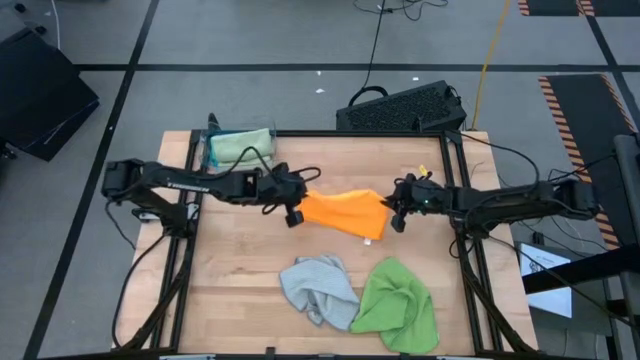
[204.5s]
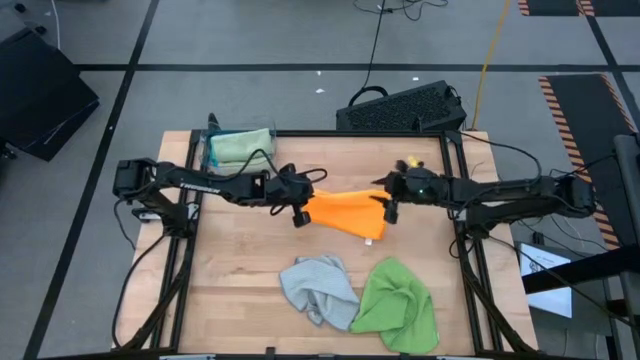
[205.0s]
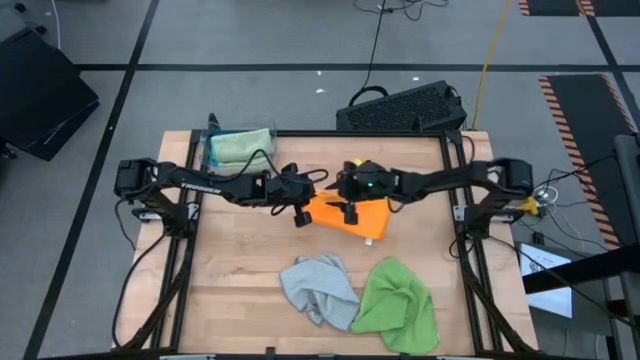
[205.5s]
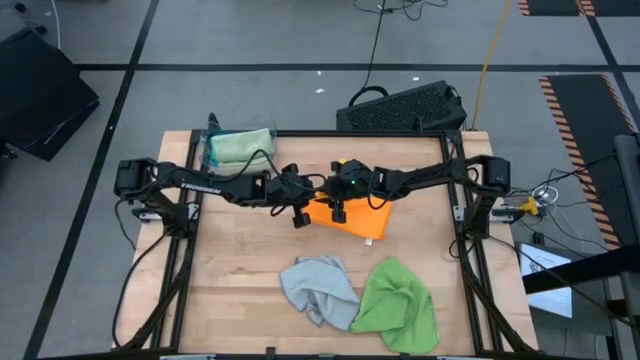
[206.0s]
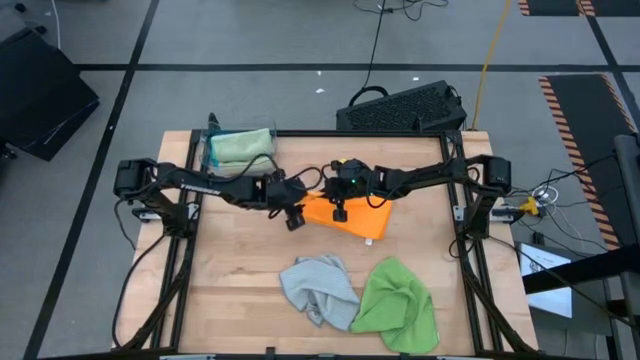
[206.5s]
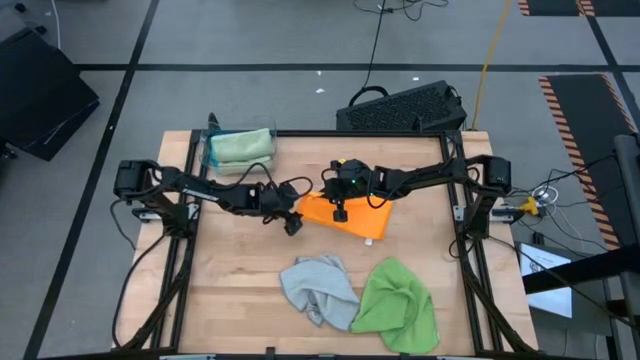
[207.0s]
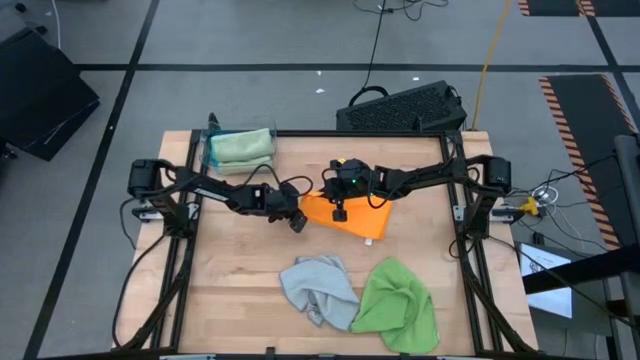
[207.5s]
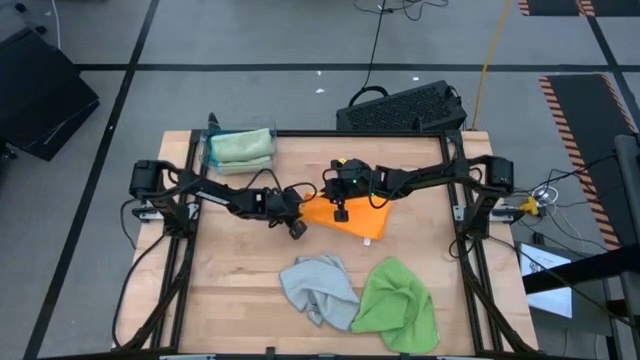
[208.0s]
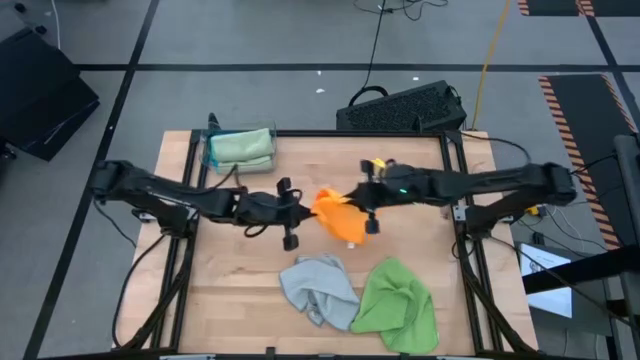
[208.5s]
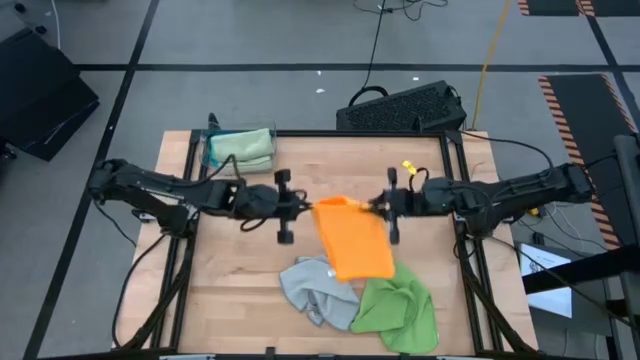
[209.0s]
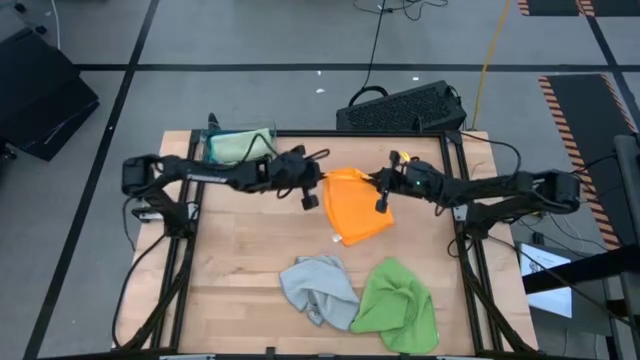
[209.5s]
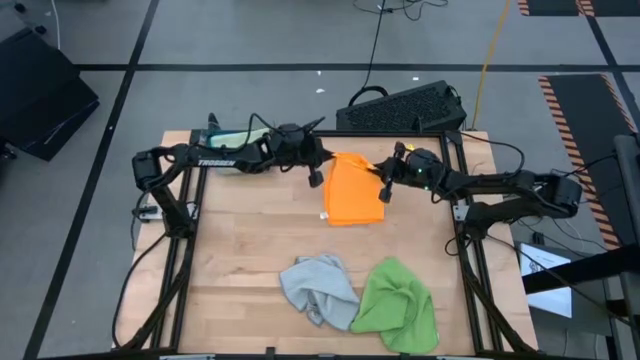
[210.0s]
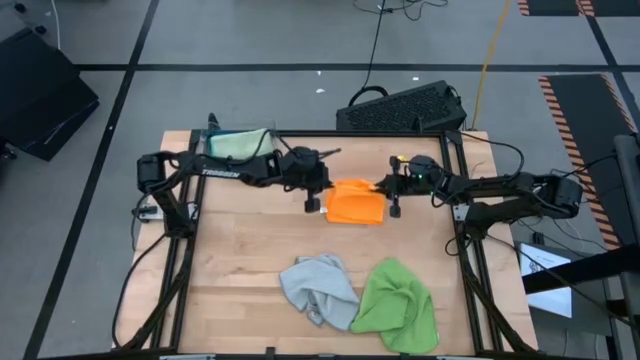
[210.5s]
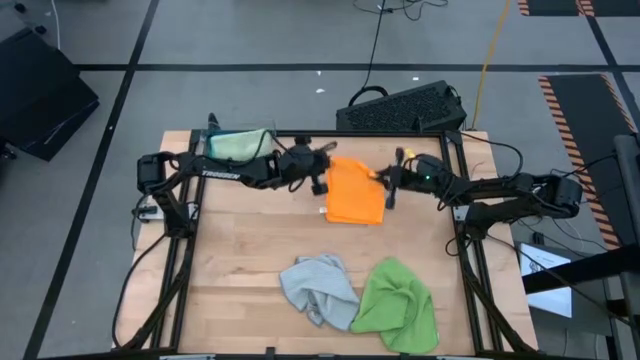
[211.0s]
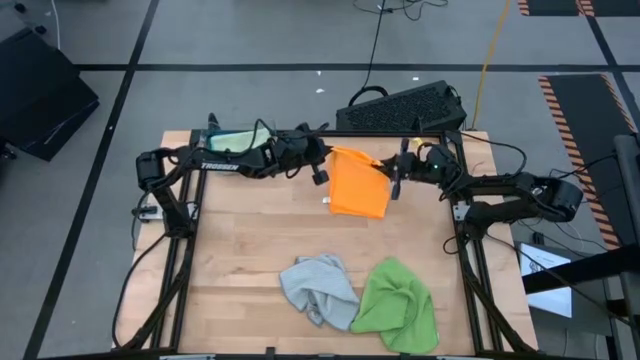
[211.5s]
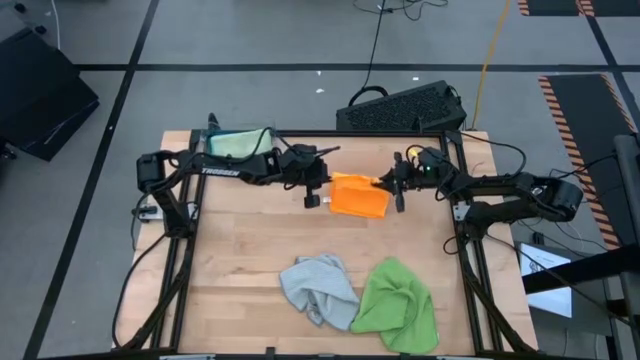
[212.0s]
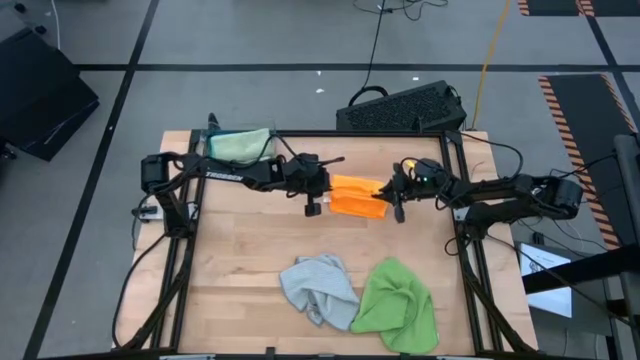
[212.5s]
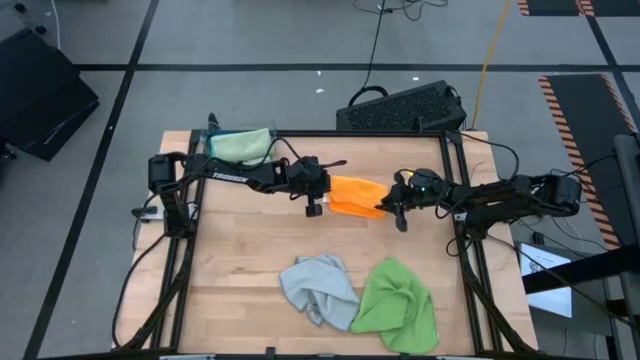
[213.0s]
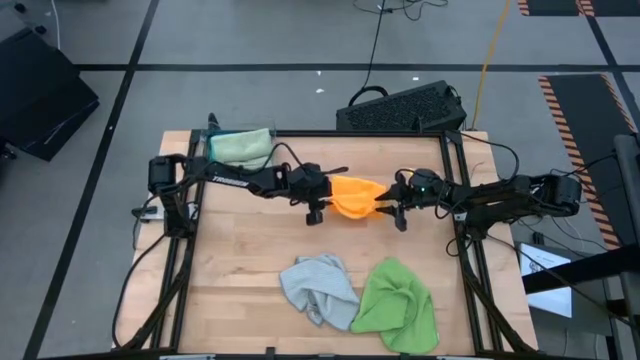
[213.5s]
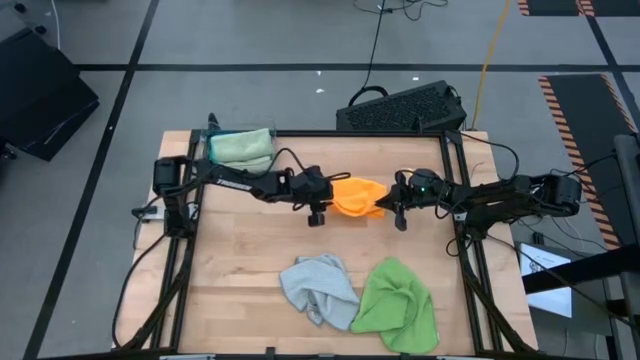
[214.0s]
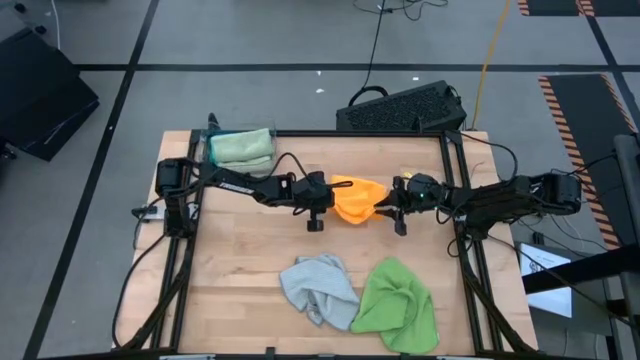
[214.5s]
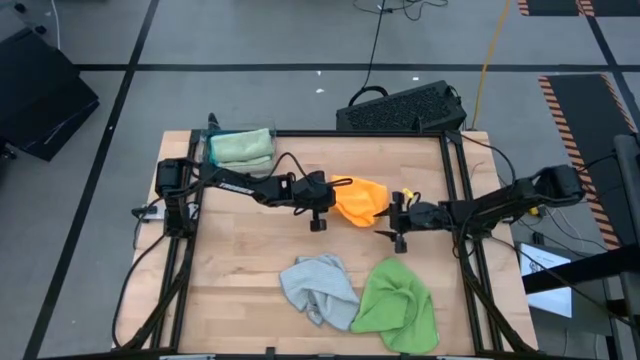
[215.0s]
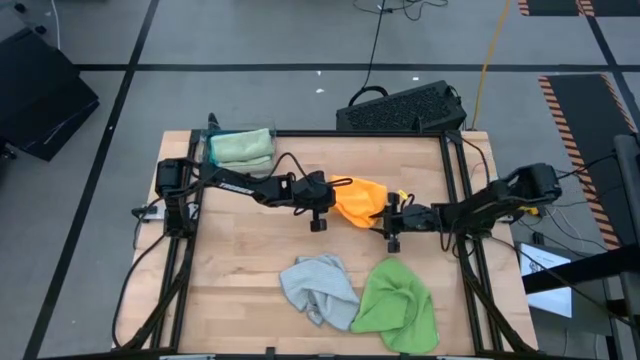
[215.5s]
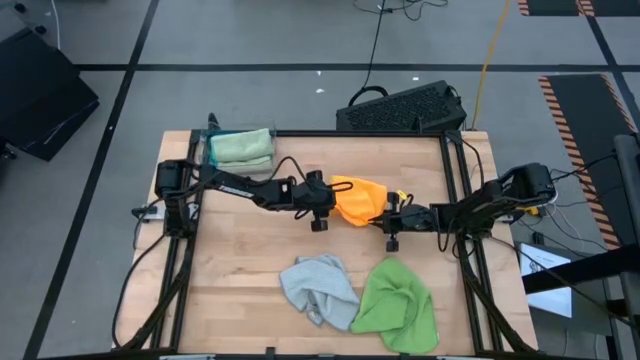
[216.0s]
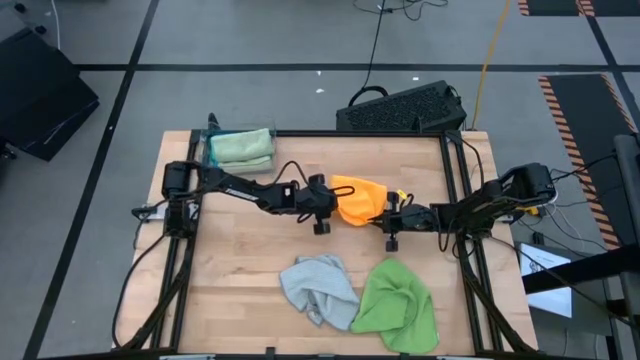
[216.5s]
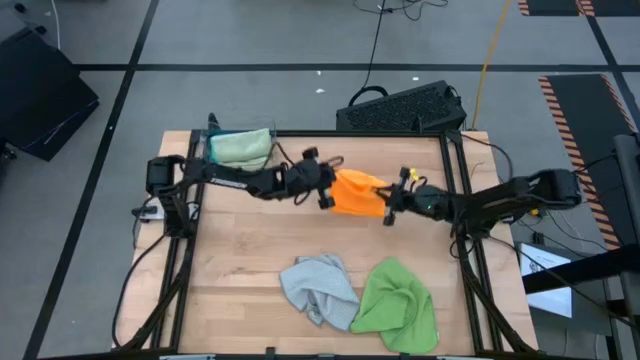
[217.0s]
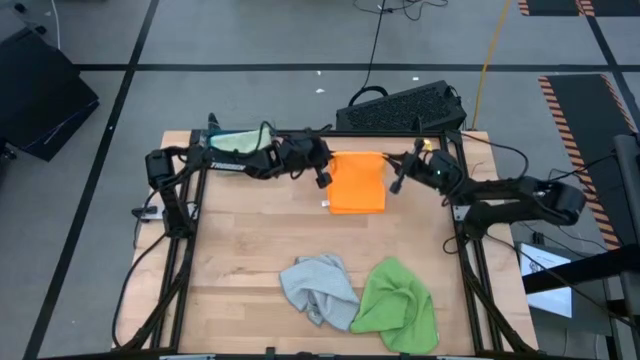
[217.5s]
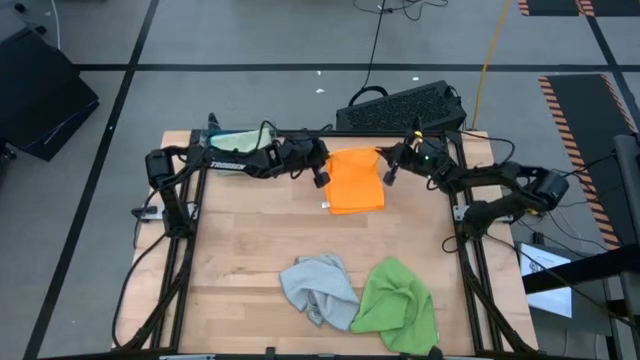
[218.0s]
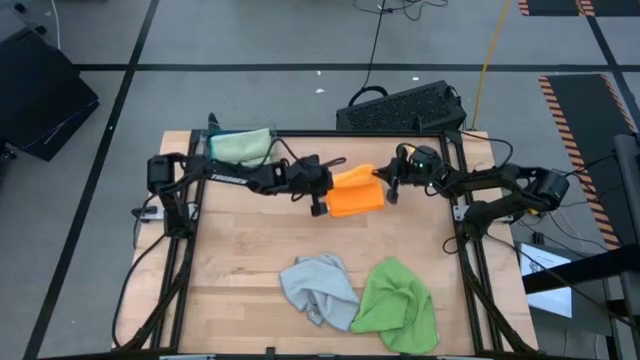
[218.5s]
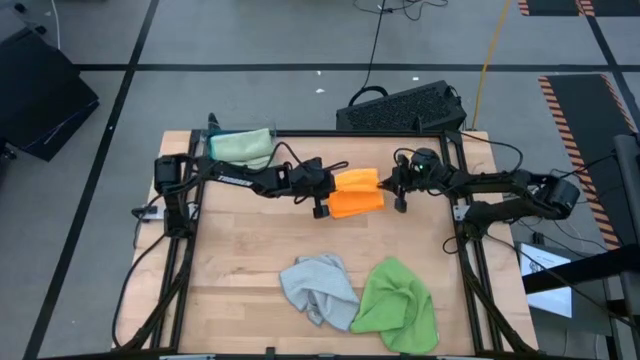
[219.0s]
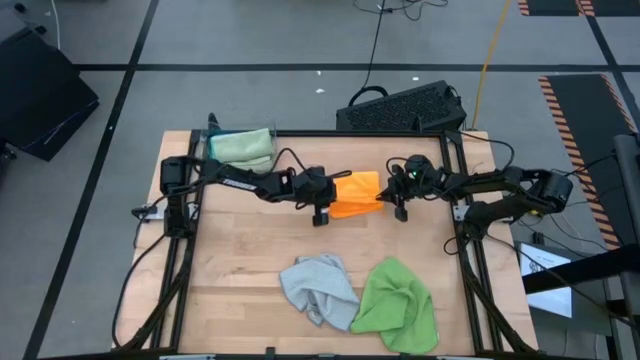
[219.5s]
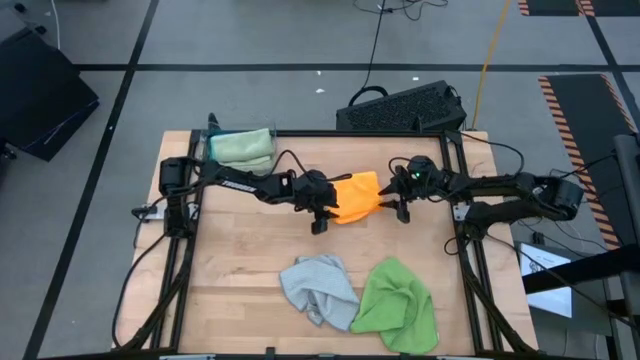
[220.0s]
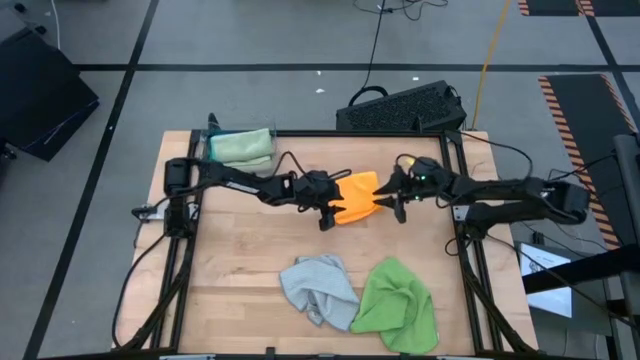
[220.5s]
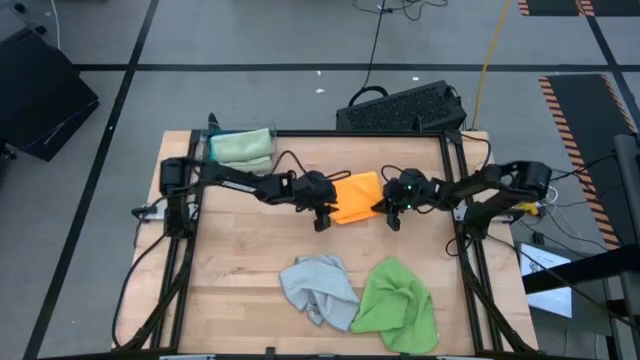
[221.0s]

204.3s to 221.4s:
Task: Fold microfiber towels
Fold the orange microfiber cloth

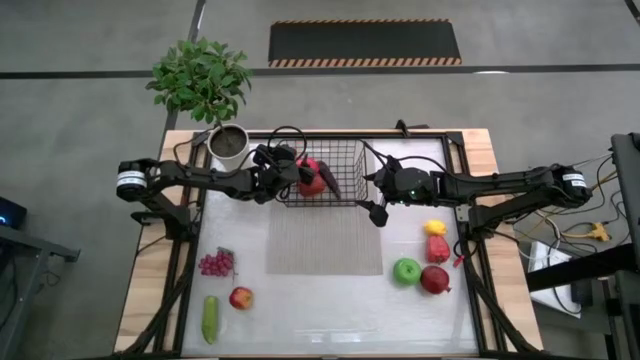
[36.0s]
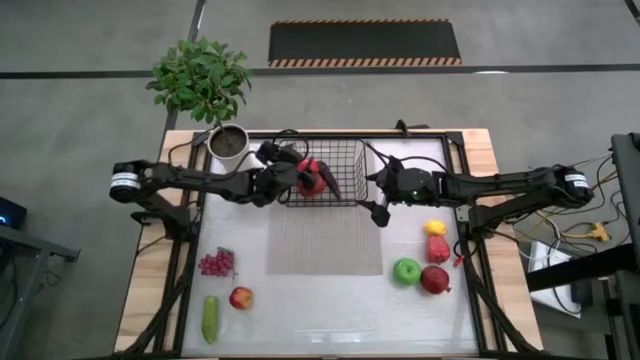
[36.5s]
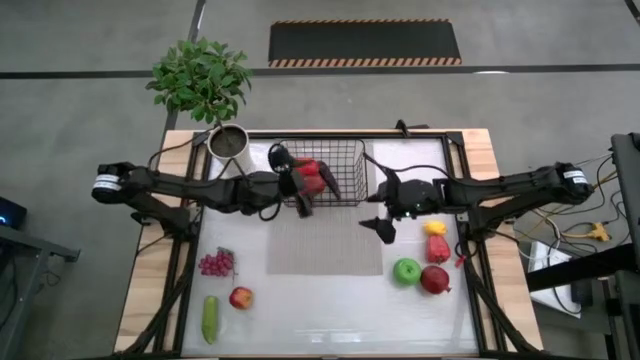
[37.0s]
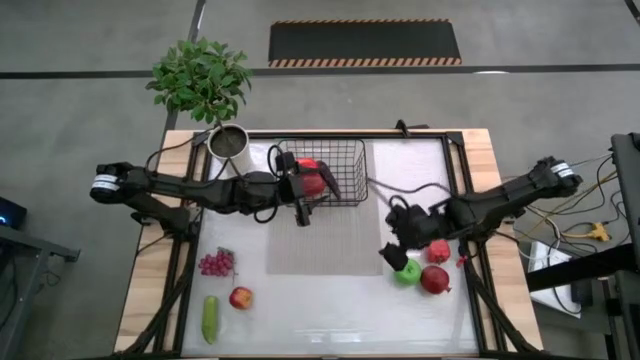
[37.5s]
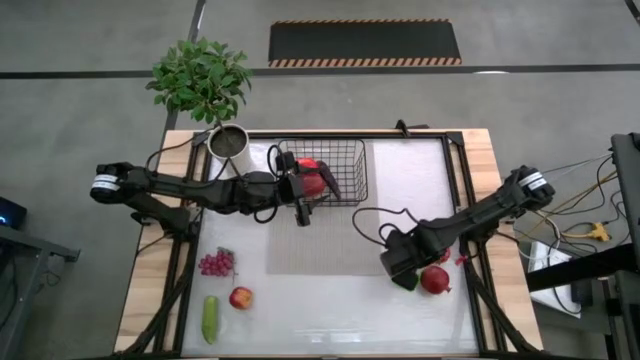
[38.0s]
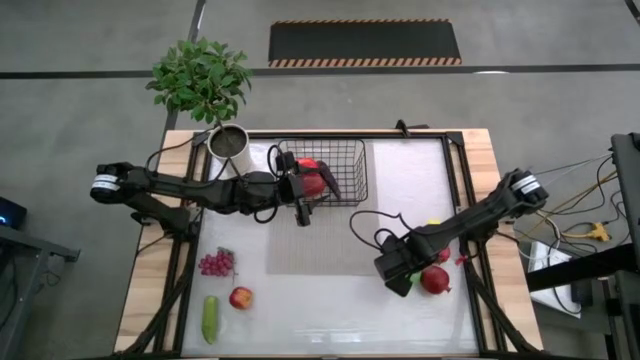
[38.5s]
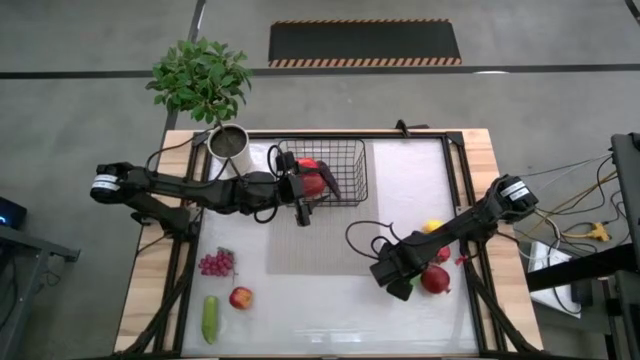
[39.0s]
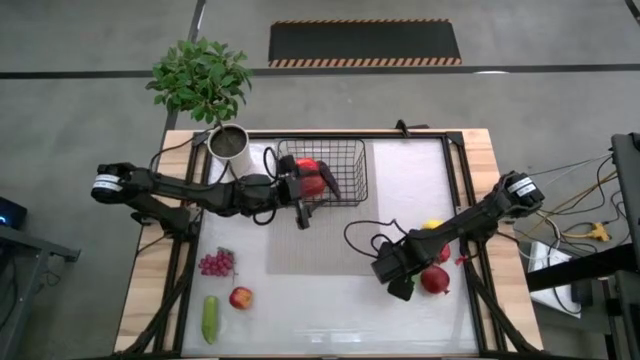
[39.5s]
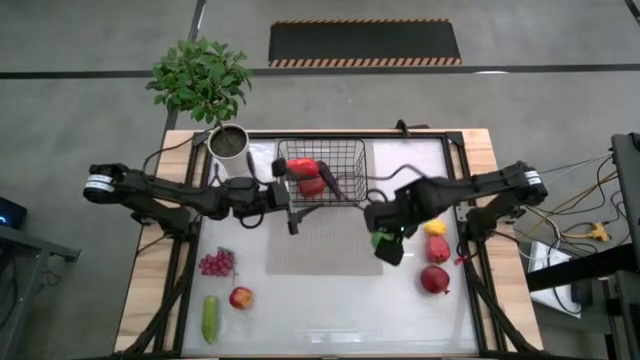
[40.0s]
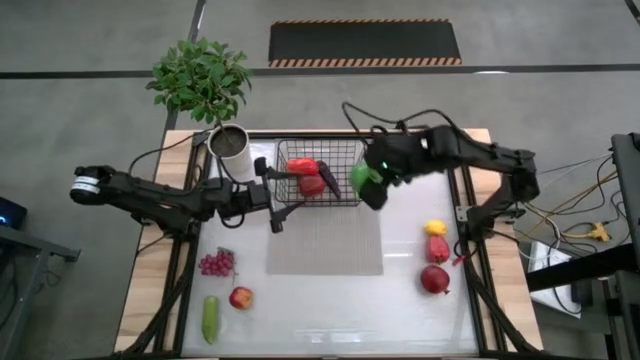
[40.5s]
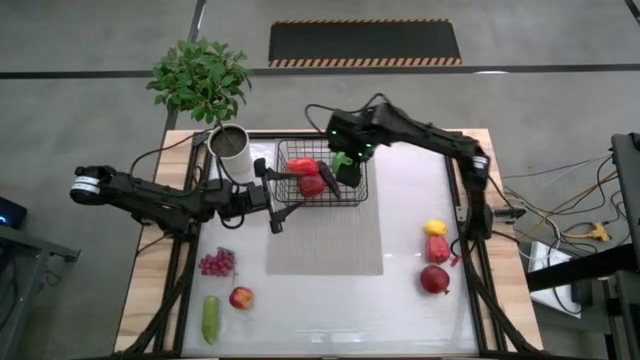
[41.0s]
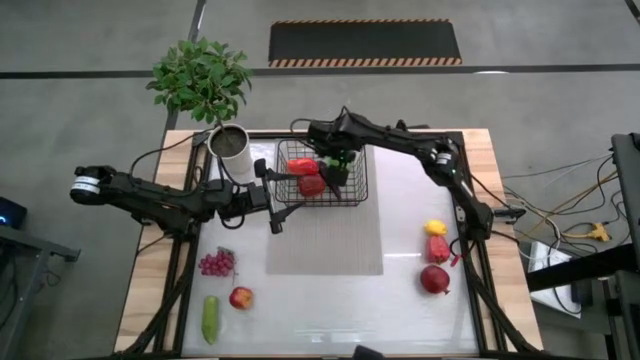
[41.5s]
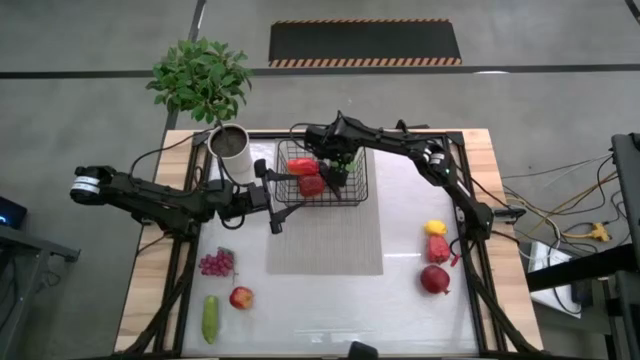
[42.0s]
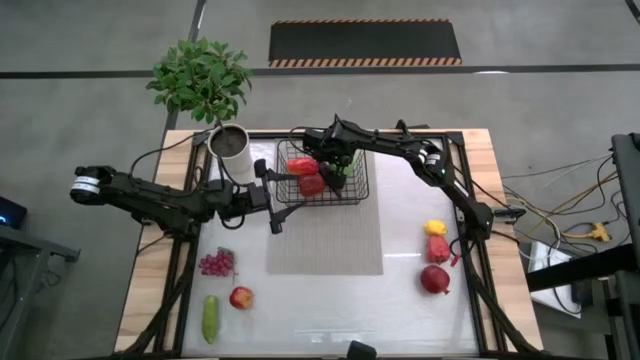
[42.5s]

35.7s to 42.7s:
Task: Build produce basket
Put the green apple into the wire basket
